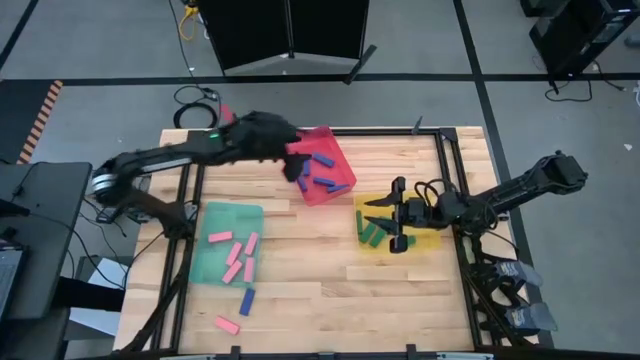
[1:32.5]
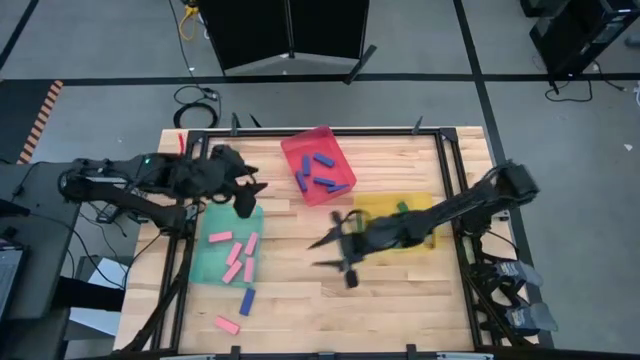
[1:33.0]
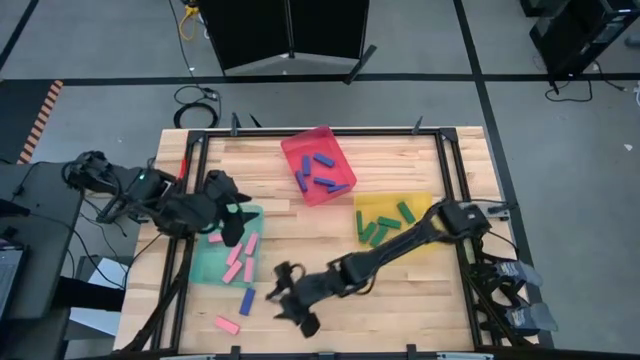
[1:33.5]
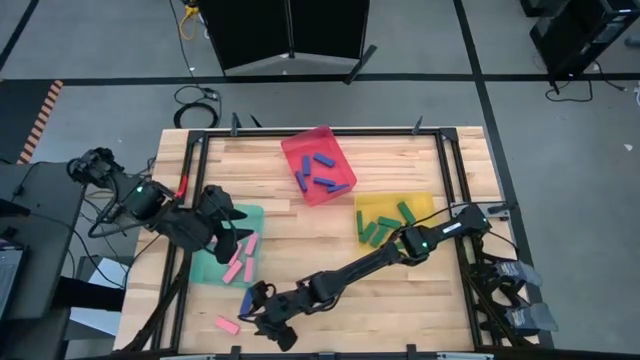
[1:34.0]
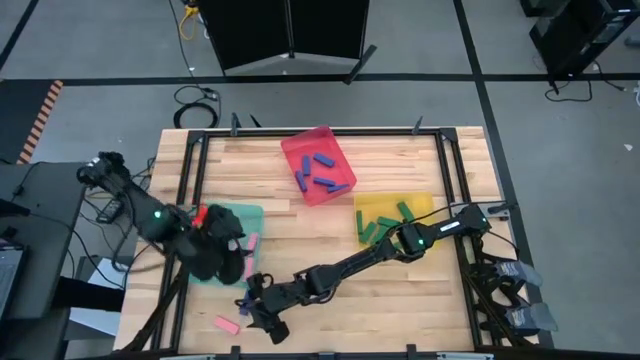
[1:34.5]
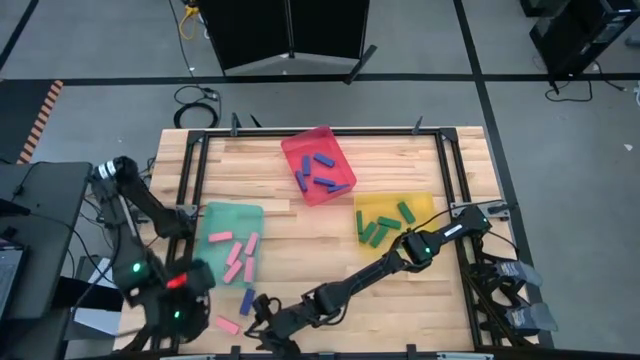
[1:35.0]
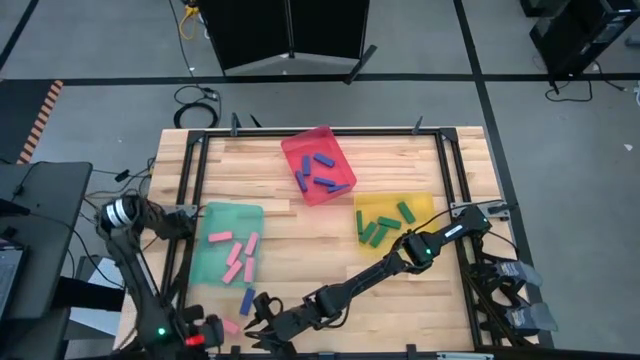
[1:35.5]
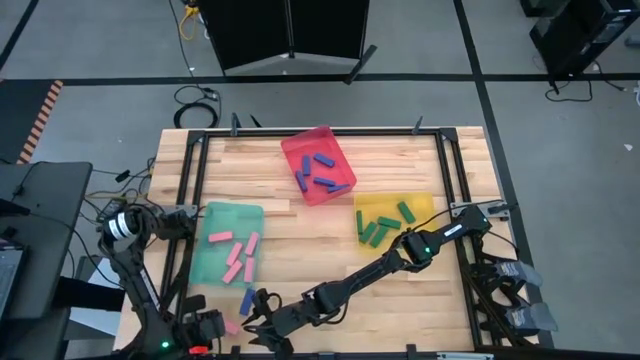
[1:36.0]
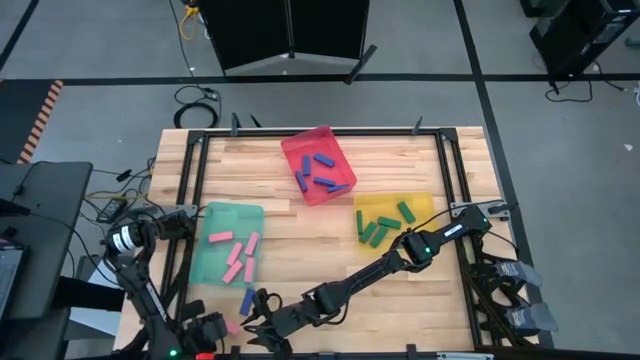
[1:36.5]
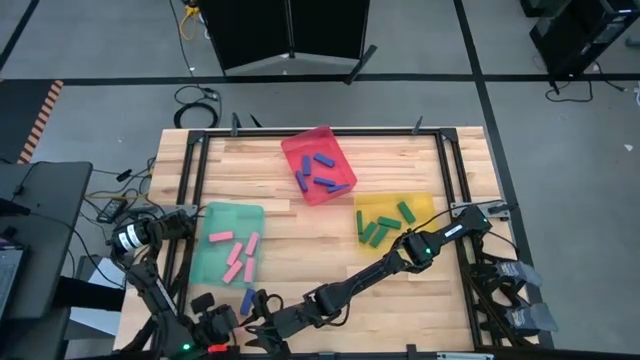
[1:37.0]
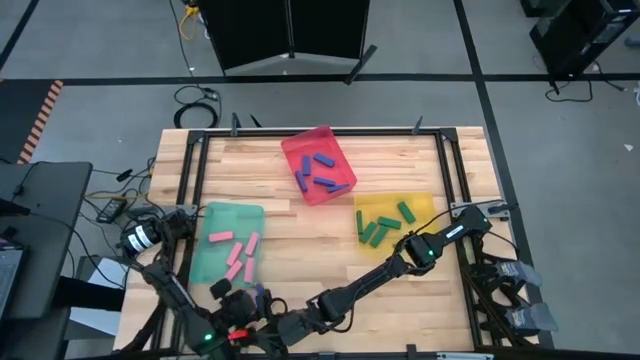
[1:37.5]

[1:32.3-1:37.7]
Task: Sort blocks
Adjust the pink block

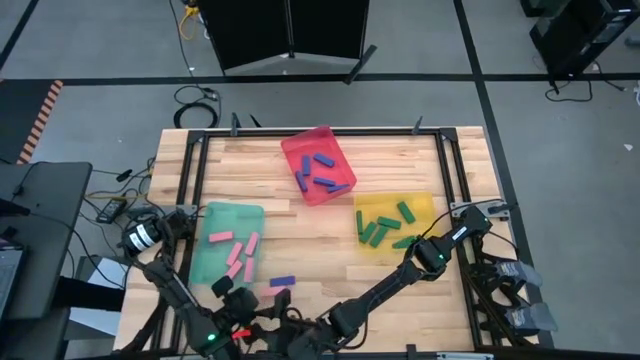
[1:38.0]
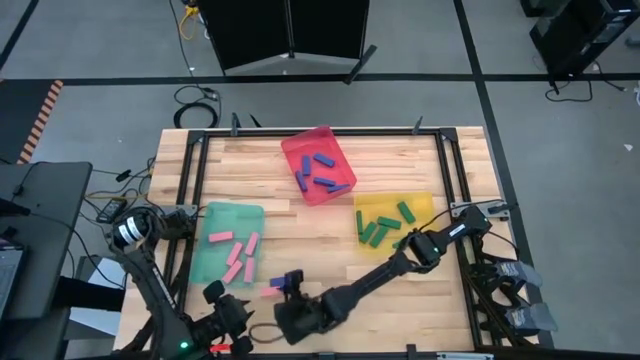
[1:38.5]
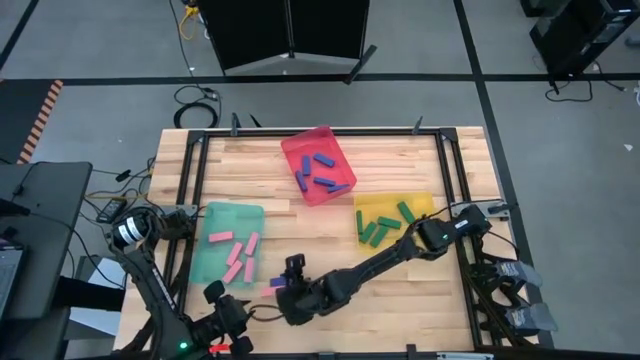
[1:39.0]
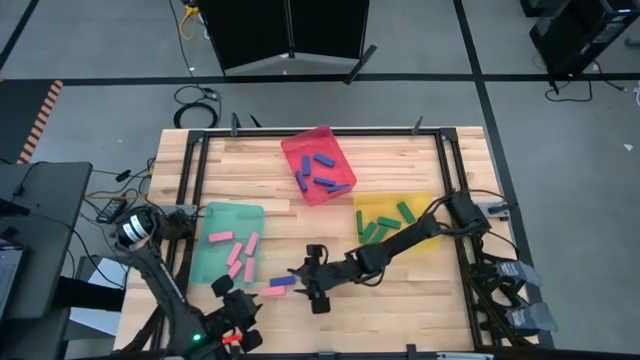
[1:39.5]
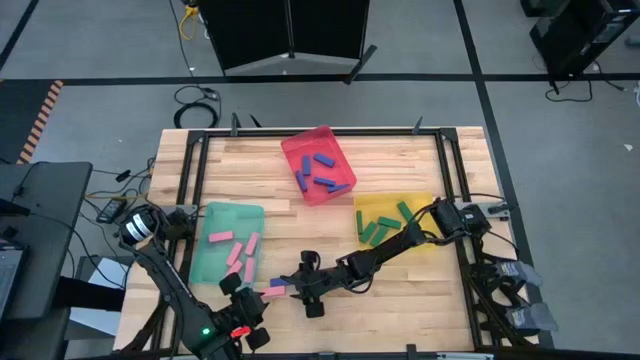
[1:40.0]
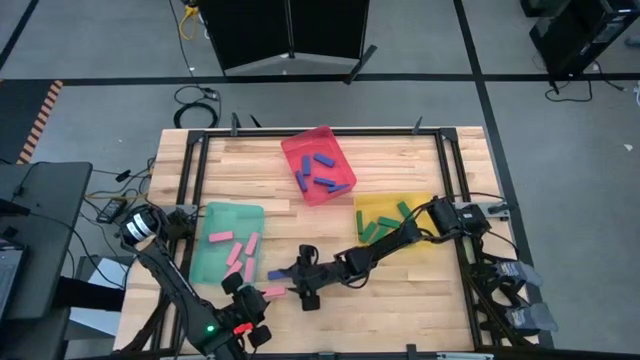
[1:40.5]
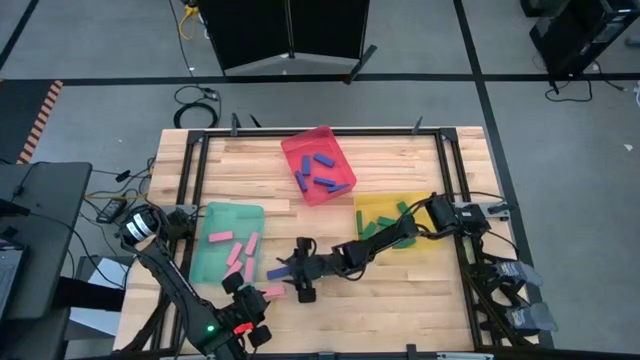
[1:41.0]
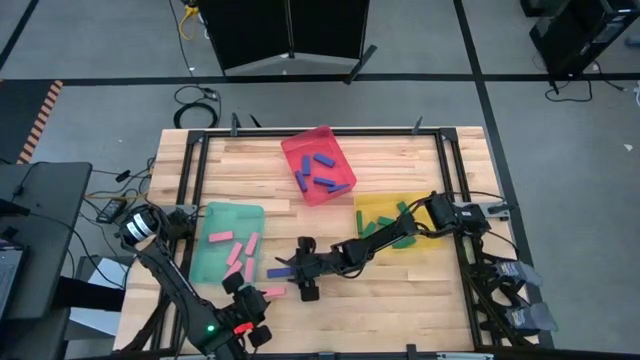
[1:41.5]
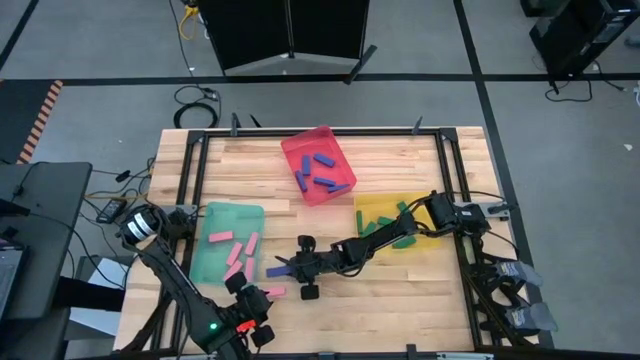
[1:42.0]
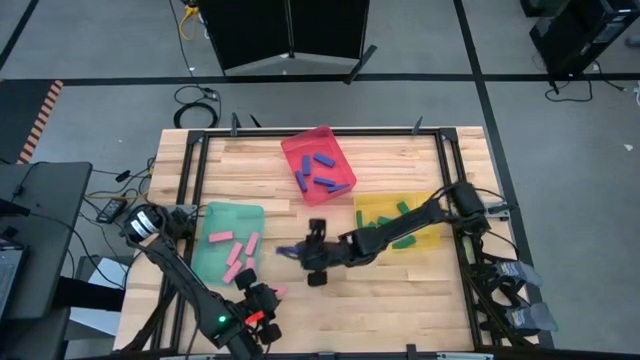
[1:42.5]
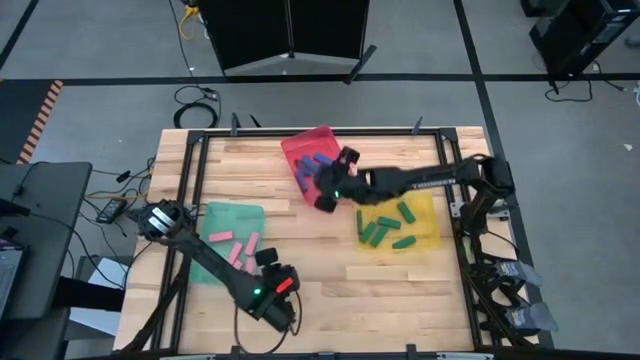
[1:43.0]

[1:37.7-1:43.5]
Put the blue block into the red bin

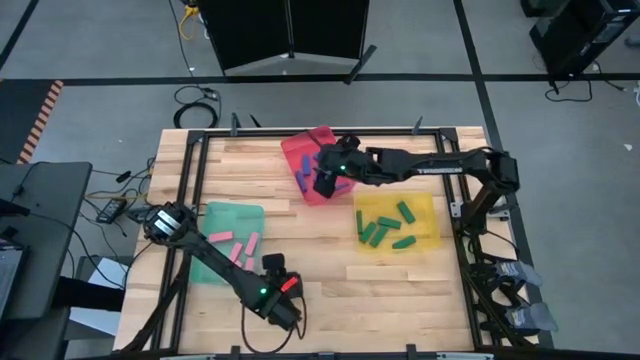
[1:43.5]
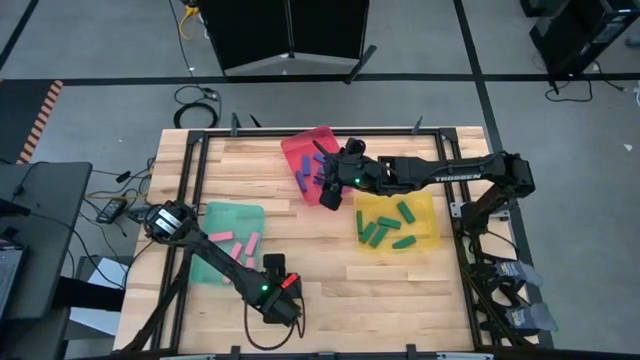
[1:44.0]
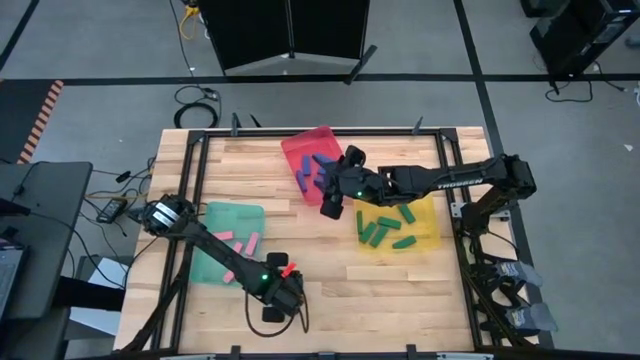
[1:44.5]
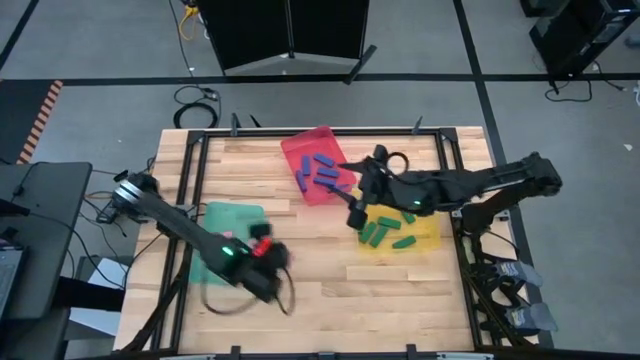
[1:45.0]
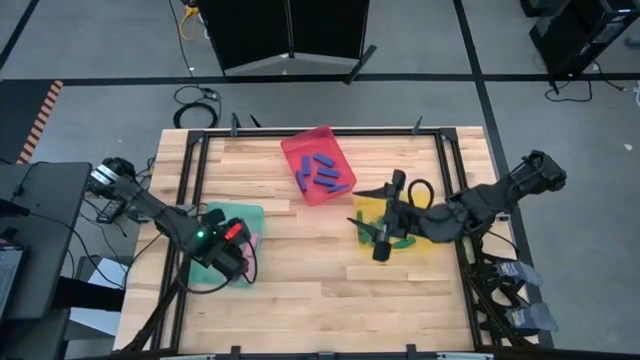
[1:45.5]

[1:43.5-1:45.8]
Put the pink block into the green bin

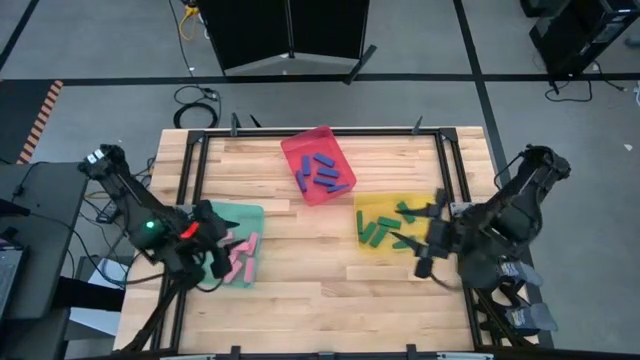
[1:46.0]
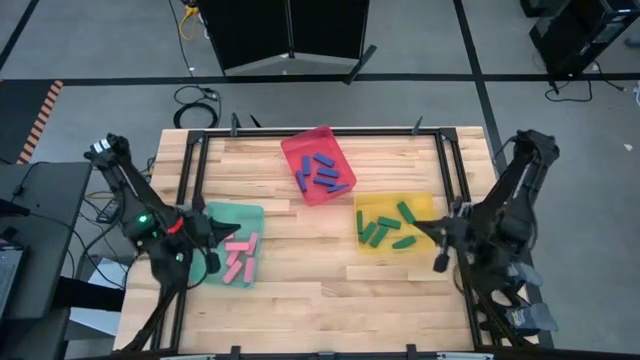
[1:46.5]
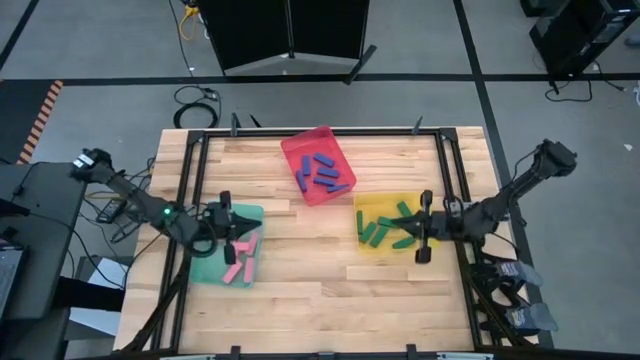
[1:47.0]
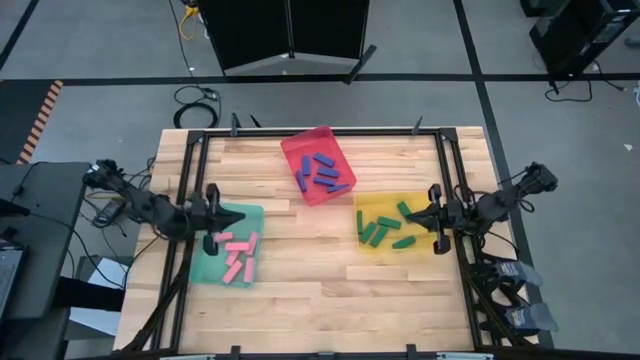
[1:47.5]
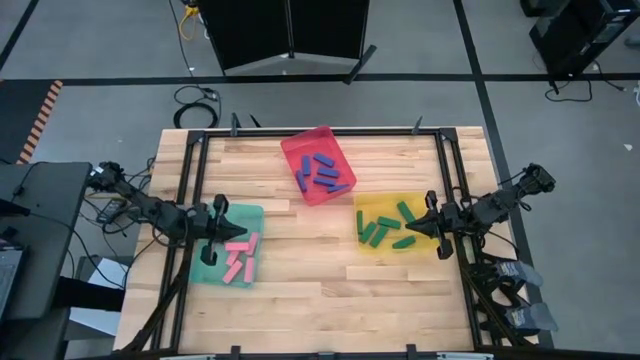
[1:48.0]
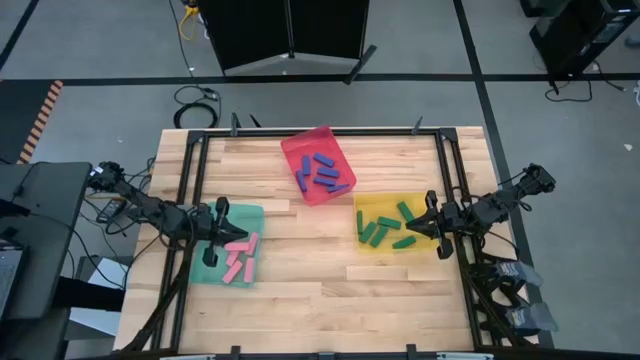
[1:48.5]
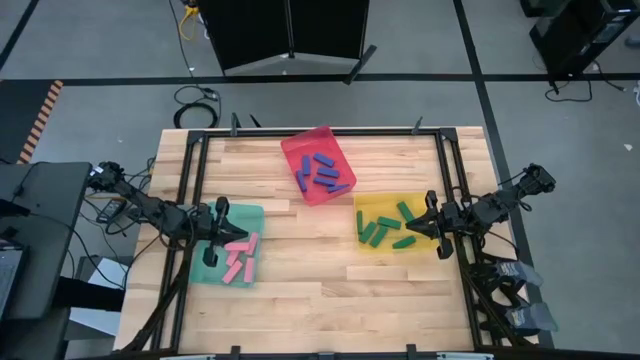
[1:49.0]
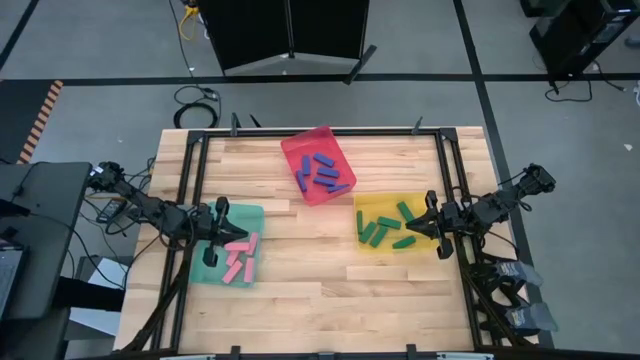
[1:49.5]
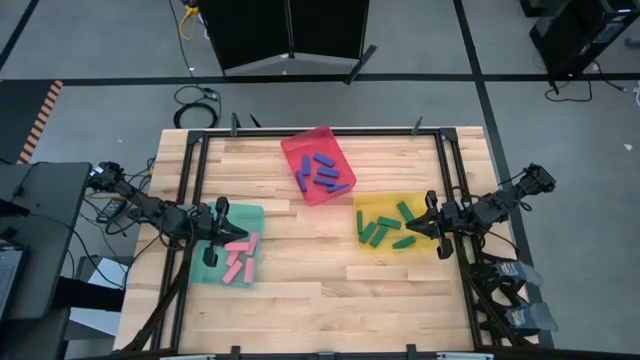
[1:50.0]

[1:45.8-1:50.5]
Return to Home Position

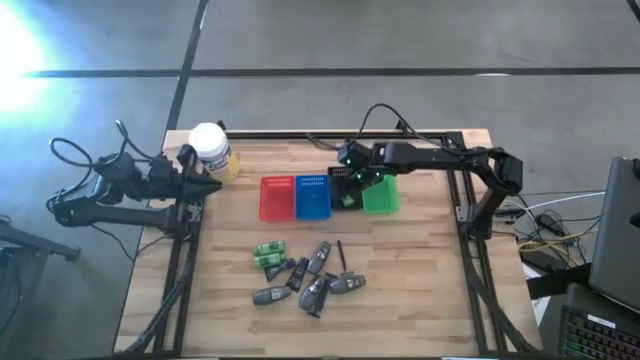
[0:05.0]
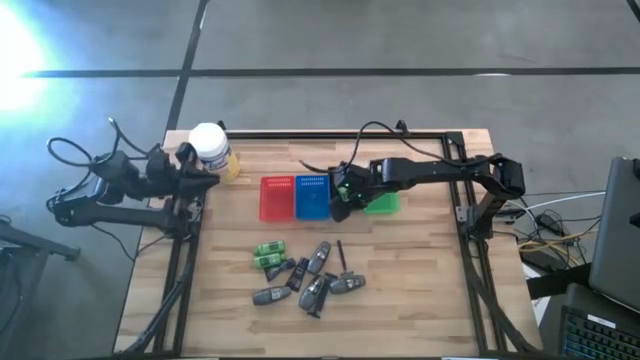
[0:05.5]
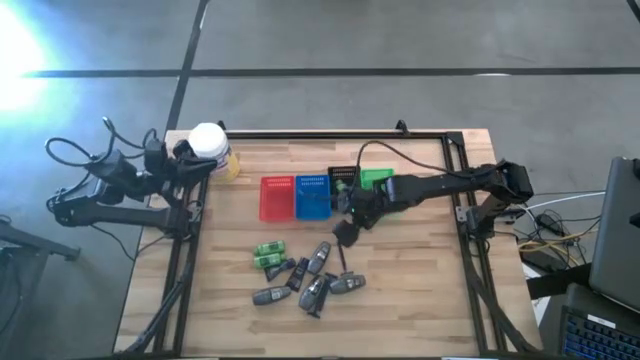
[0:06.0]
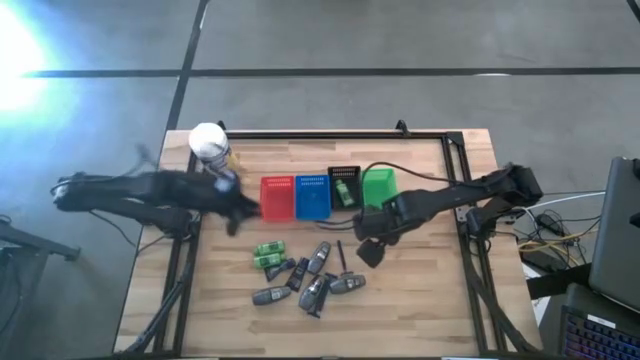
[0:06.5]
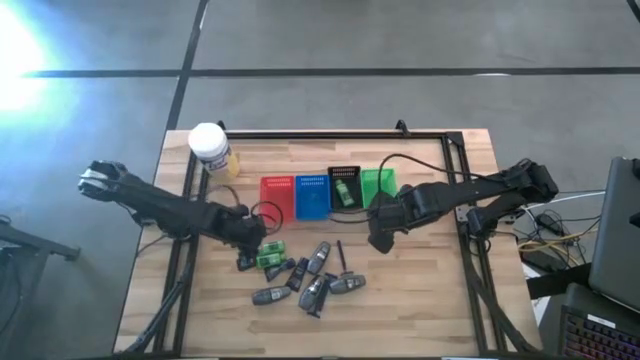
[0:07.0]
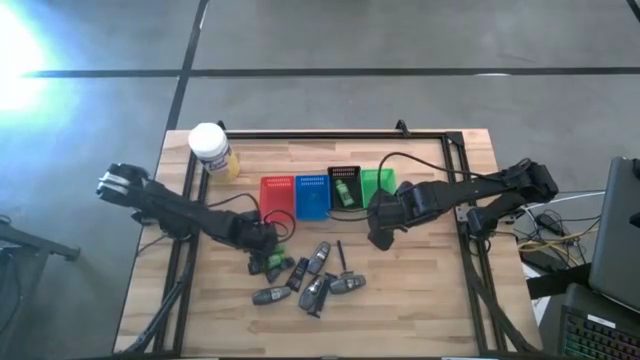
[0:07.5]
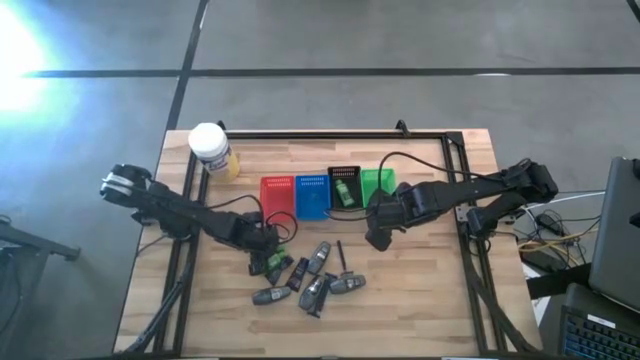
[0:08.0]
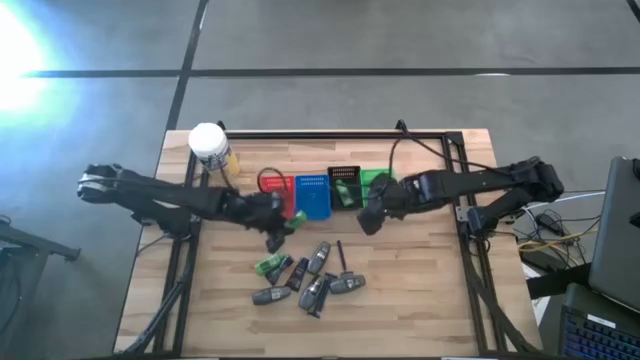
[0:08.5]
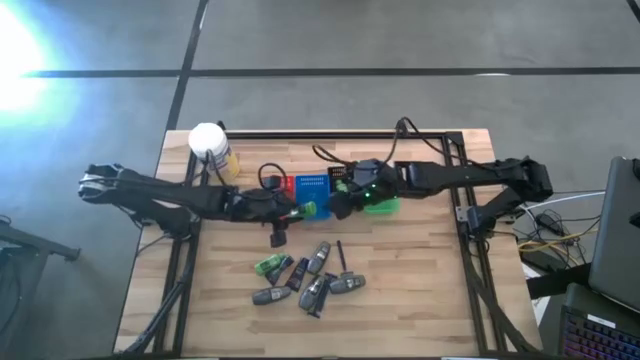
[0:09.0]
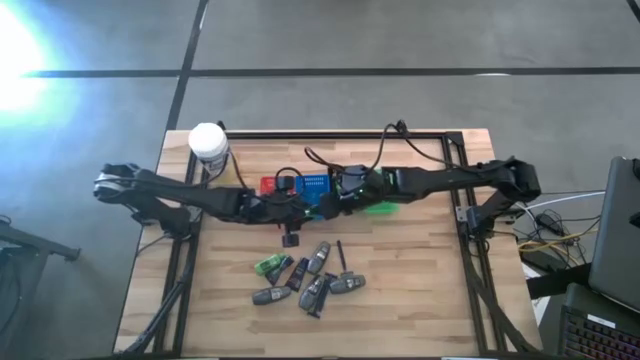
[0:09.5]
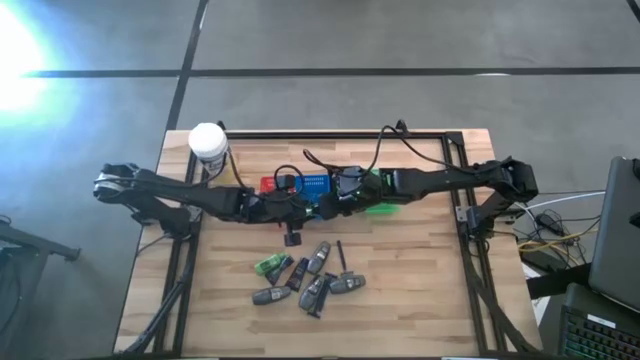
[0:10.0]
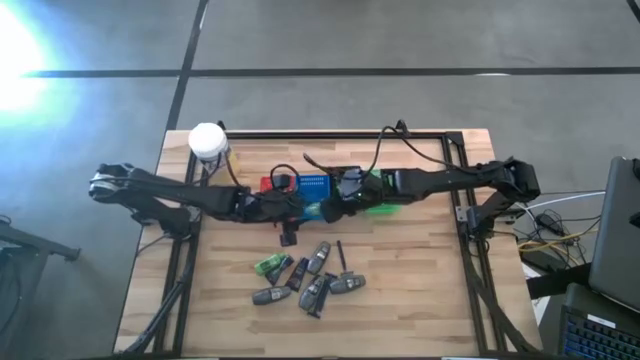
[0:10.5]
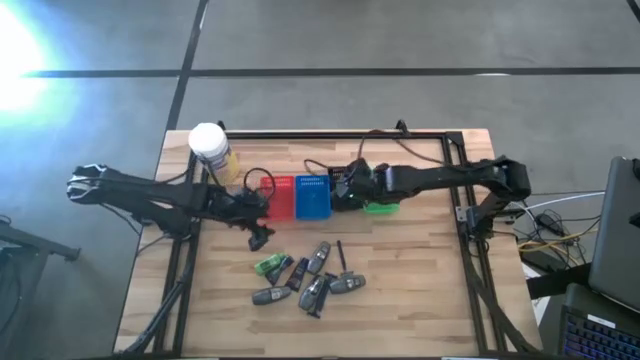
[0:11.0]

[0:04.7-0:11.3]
Task: Pick & Place Travel size toiletries
Put the green shampoo into the black bin
